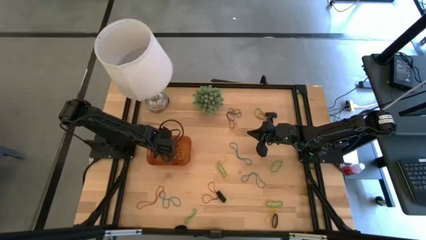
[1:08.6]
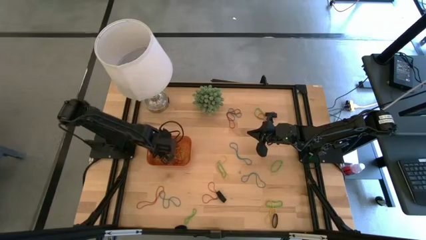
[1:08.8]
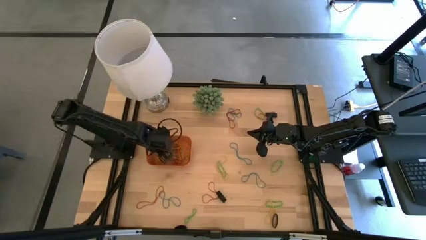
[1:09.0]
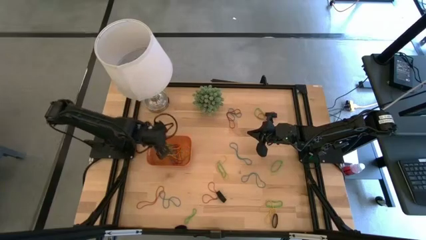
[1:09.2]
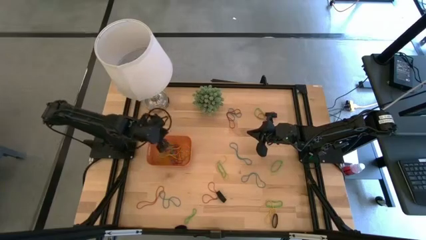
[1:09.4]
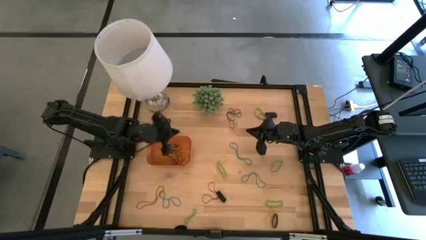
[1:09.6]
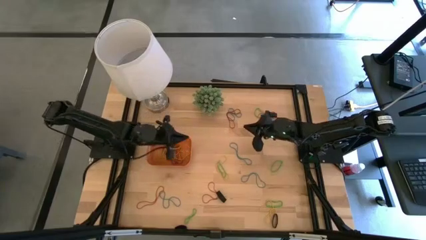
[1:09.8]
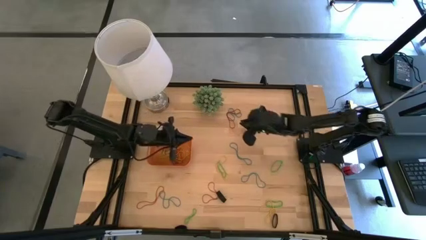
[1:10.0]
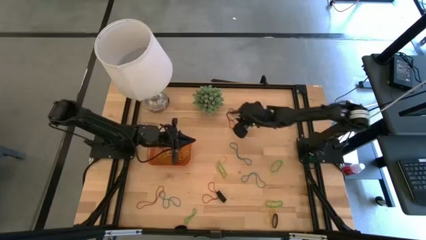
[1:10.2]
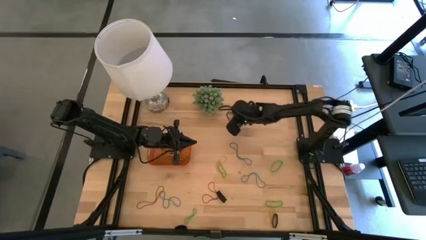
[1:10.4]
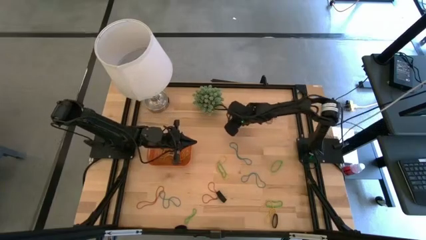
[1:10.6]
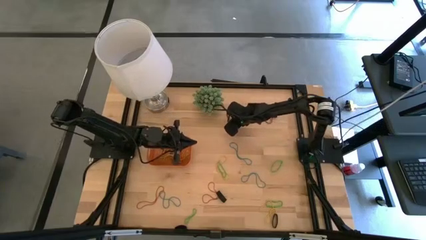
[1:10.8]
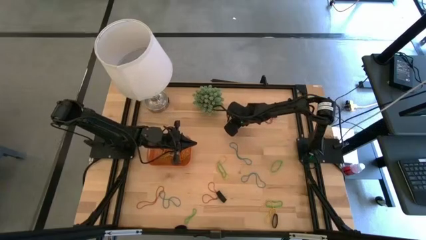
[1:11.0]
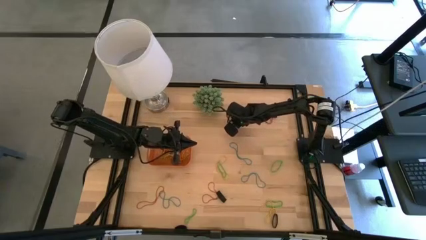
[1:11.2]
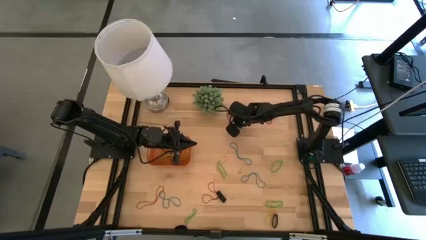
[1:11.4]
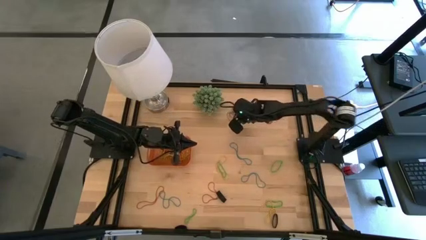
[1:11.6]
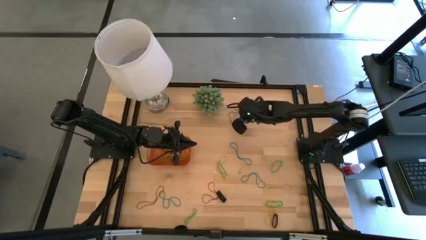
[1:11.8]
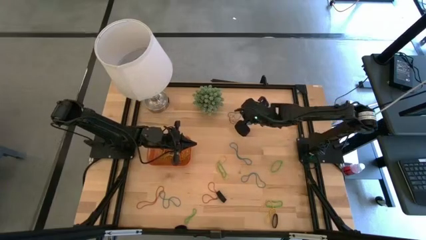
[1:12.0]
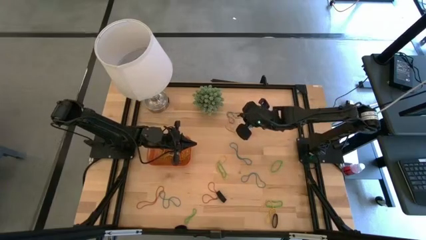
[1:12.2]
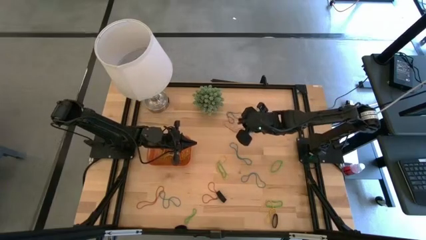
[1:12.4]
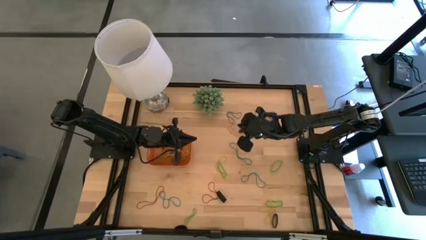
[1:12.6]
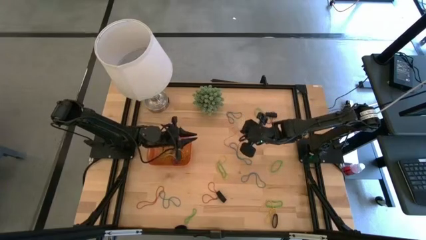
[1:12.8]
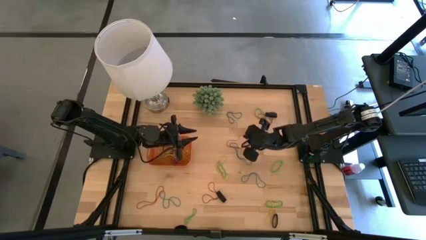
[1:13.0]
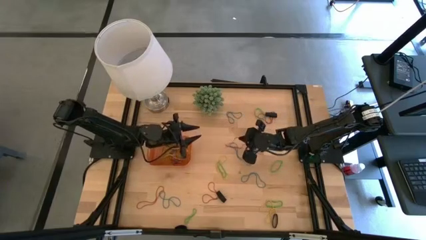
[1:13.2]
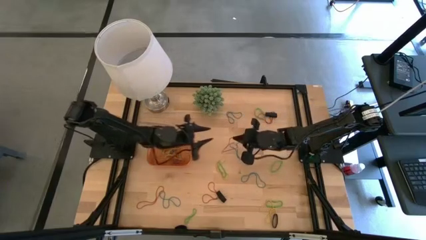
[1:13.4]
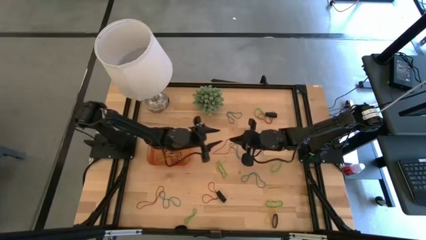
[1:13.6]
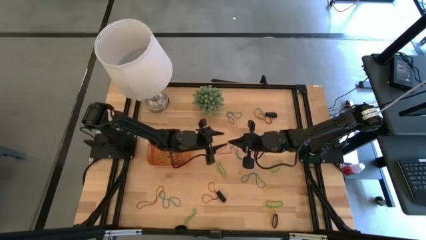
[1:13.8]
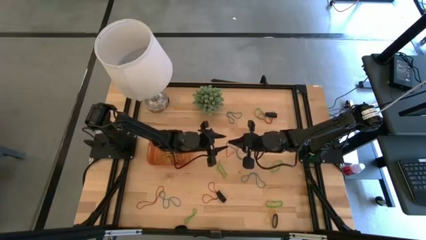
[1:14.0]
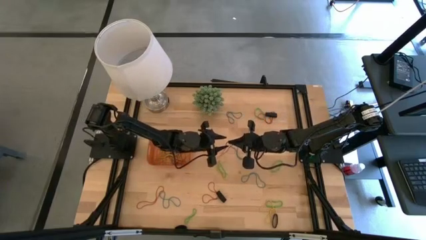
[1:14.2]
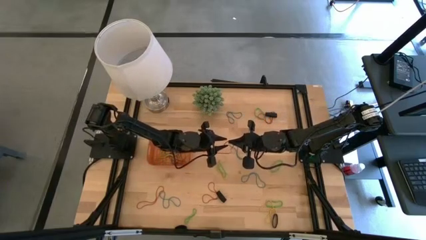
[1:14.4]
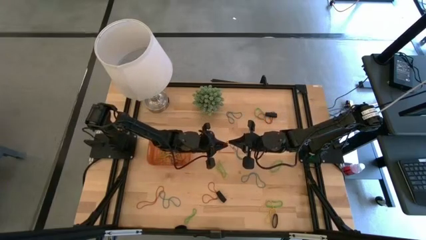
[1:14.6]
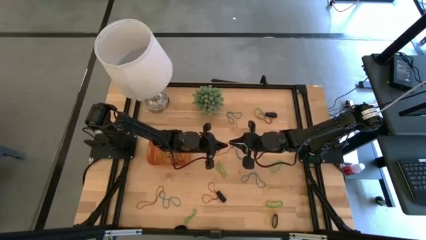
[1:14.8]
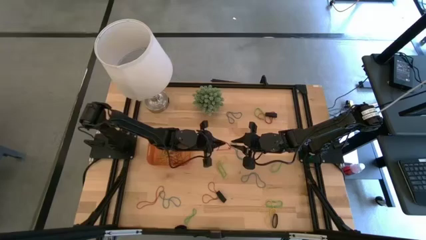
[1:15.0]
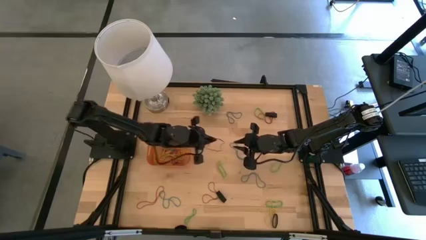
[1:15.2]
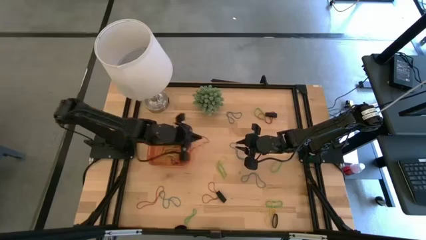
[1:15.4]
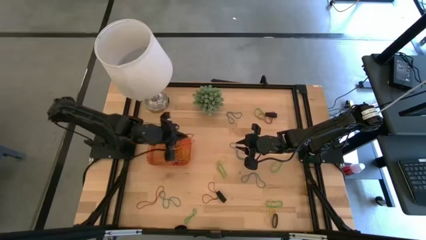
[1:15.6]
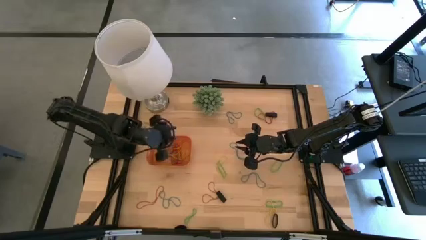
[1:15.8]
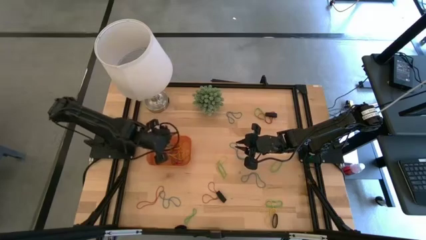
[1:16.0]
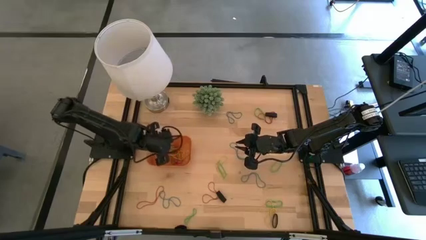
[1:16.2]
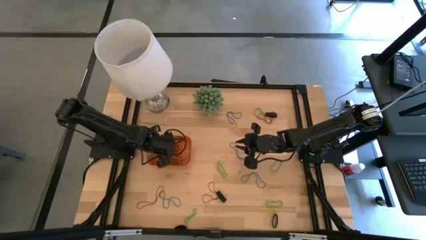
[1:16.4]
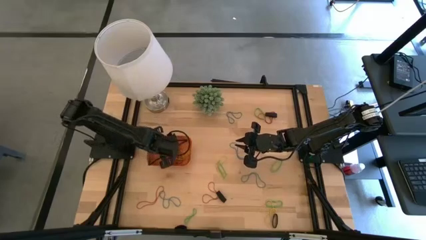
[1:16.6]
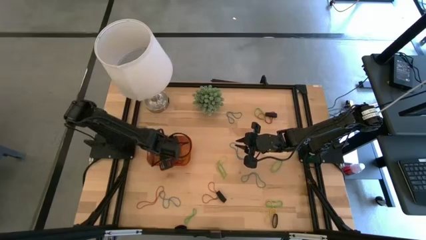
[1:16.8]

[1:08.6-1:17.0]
Task: Pick and place rubber bands into bin
Put the red rubber band into the orange bin

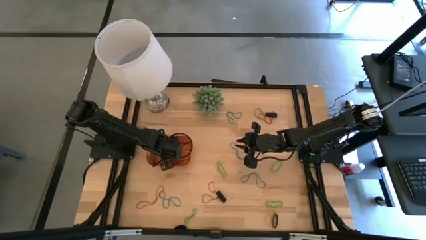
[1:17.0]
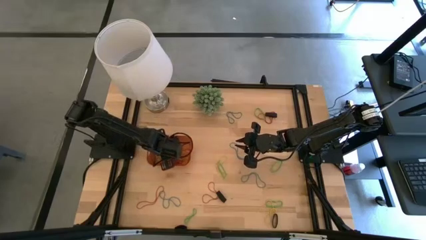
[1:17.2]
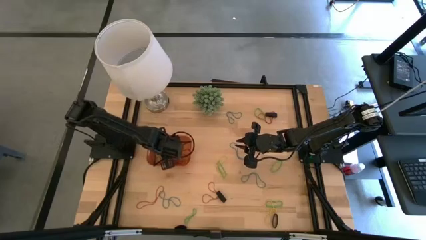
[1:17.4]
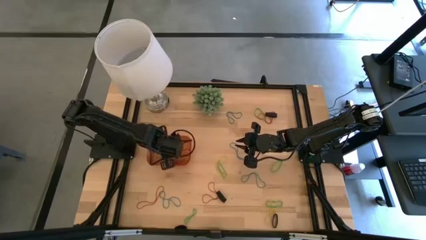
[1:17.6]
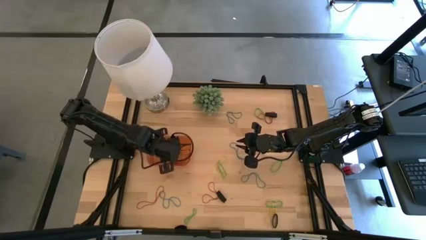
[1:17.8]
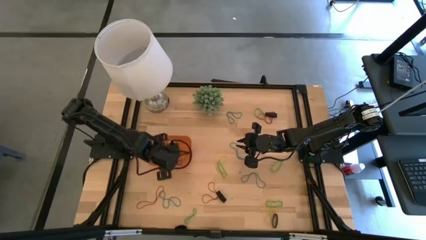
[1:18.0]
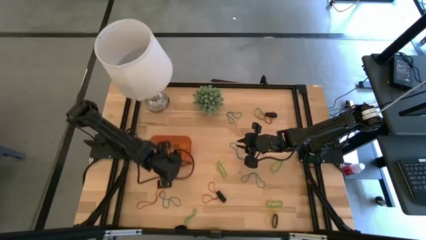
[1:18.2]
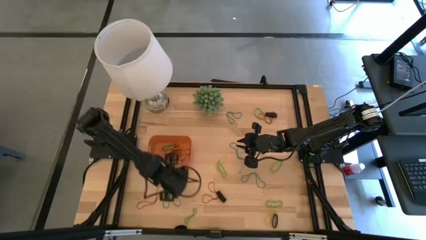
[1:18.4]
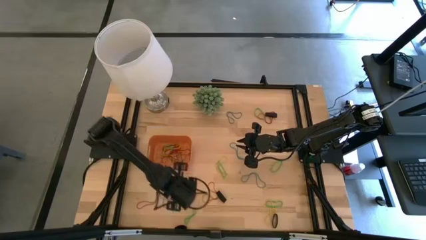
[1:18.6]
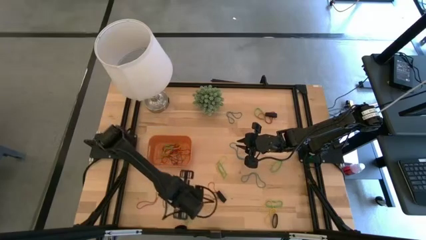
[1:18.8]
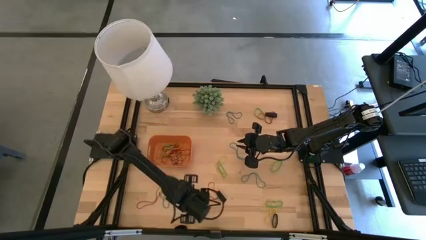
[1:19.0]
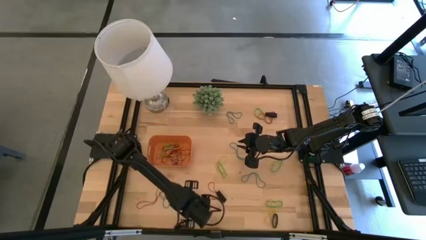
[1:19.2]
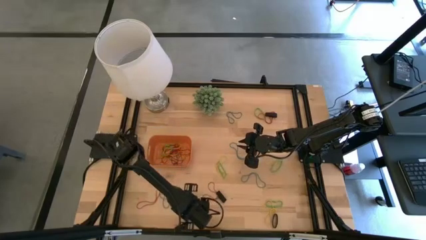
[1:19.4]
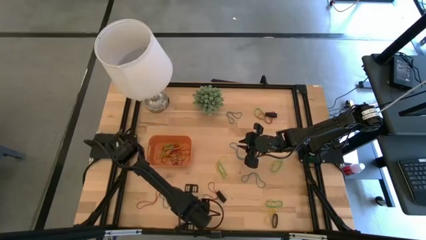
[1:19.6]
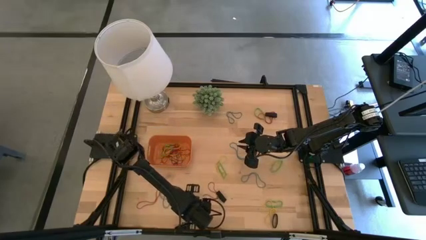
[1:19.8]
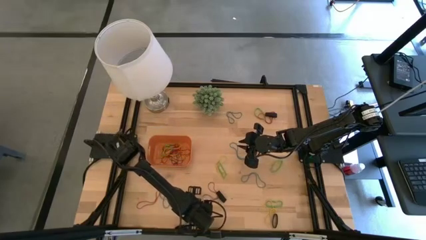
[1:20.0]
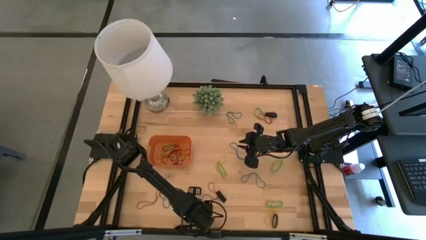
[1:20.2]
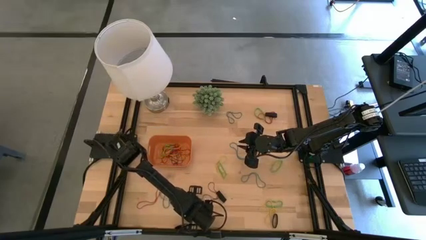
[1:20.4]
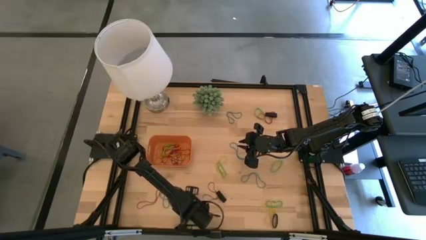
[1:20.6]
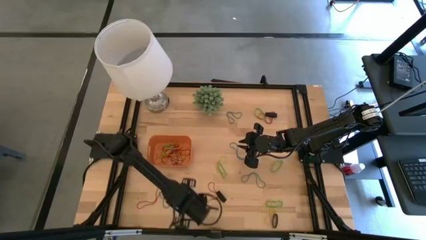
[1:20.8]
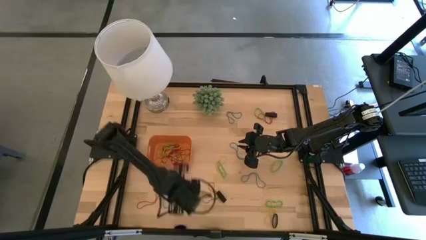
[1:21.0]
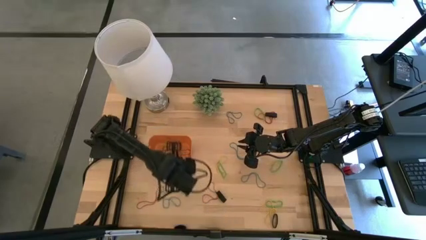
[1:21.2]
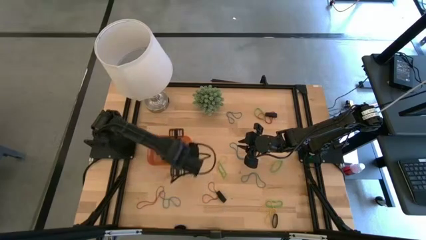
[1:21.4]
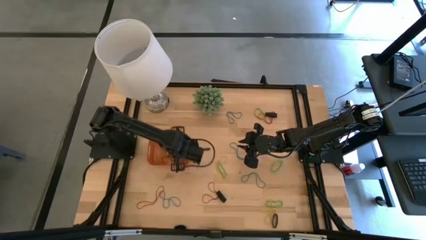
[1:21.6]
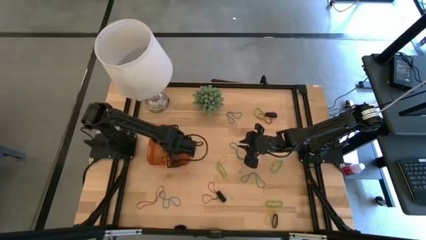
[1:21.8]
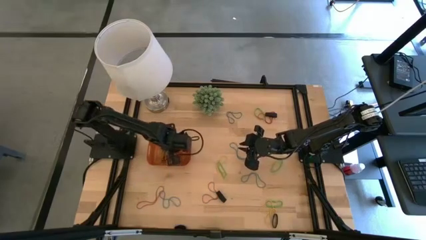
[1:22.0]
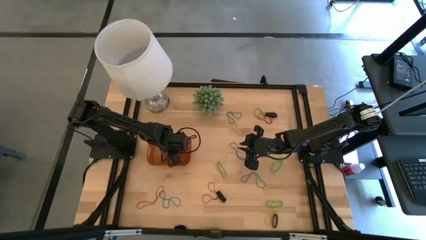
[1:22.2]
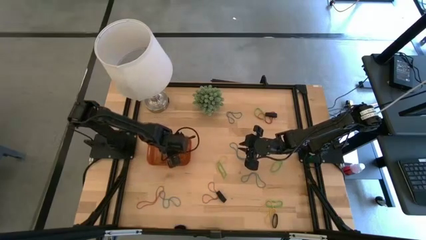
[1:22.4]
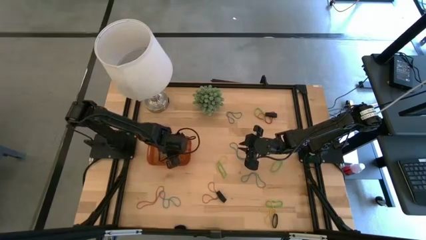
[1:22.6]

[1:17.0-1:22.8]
Put the green rubber band into the orange bin

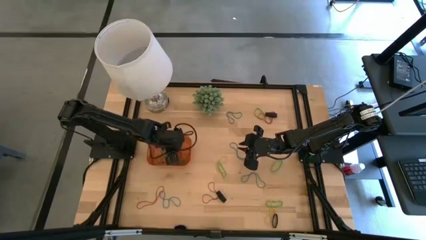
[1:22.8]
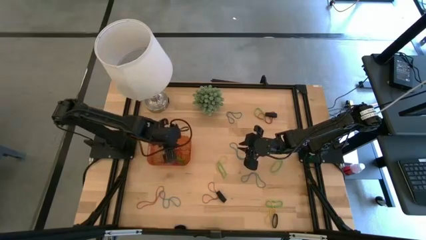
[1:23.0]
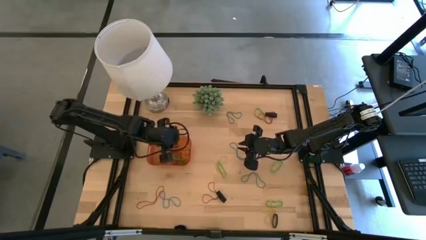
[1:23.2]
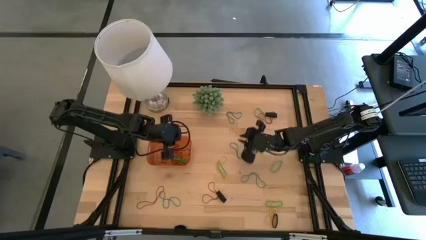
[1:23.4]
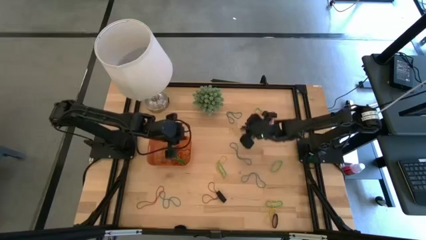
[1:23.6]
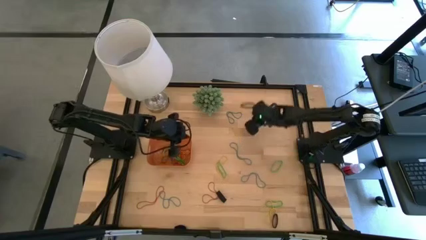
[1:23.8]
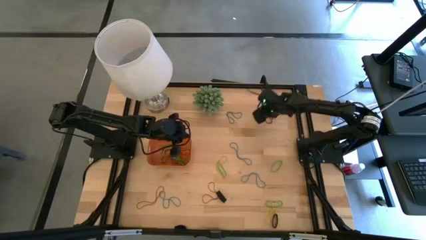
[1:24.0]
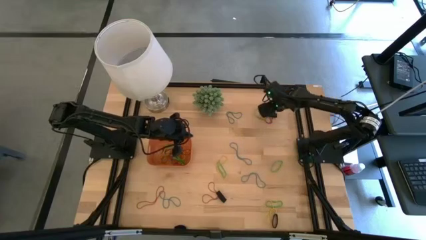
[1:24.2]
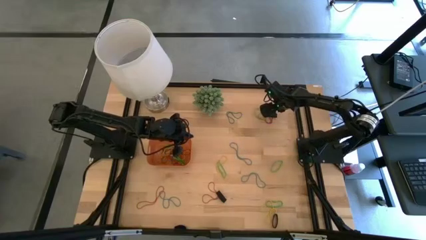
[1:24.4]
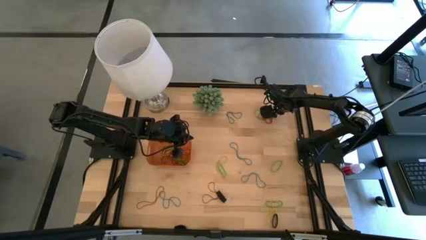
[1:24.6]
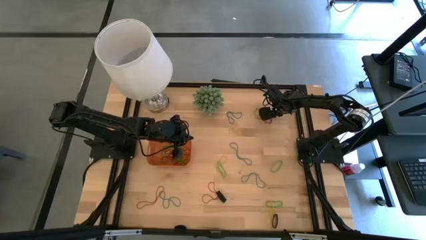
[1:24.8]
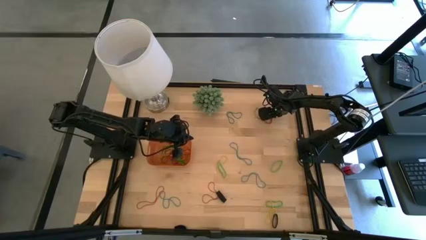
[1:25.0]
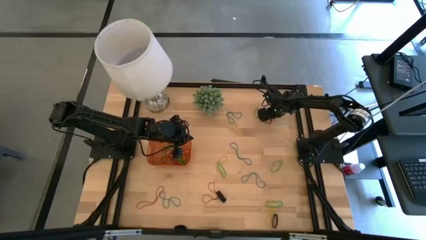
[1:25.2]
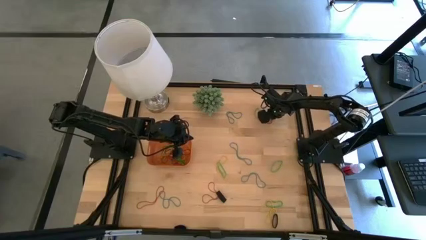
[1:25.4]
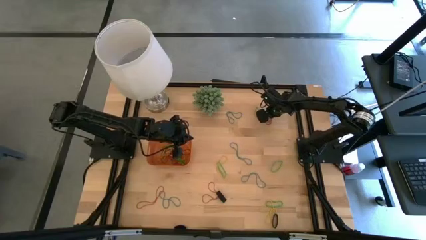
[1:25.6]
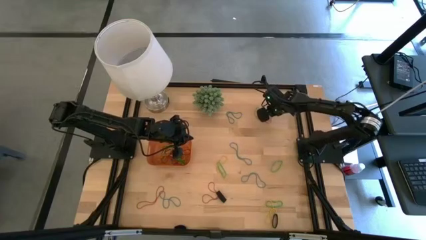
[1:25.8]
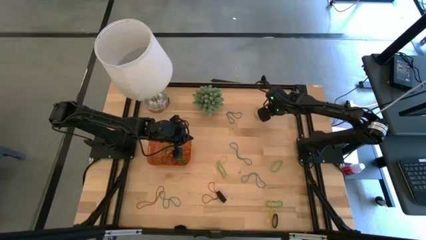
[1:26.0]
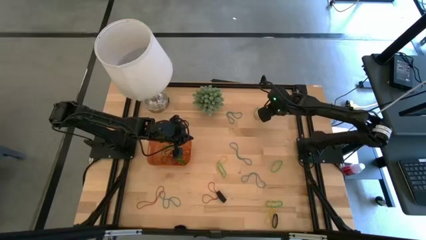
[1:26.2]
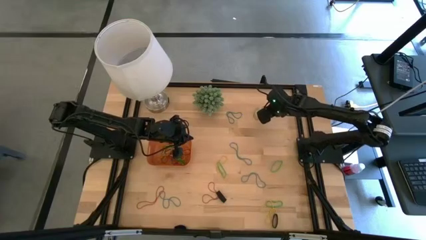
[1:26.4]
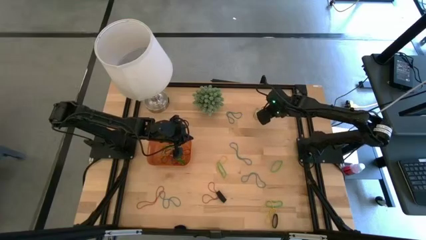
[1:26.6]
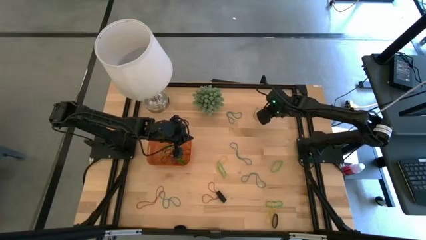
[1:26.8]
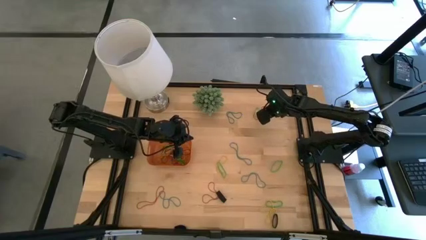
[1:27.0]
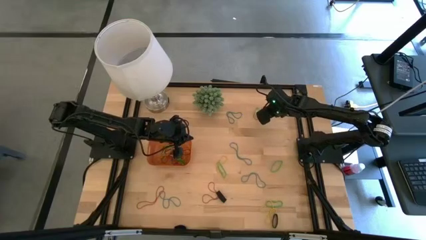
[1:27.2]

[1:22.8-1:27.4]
Put the black rubber band into the orange bin
